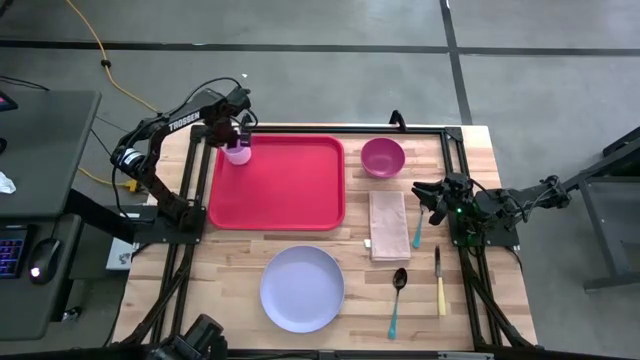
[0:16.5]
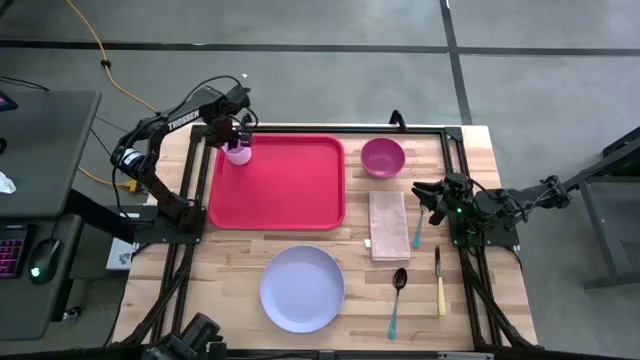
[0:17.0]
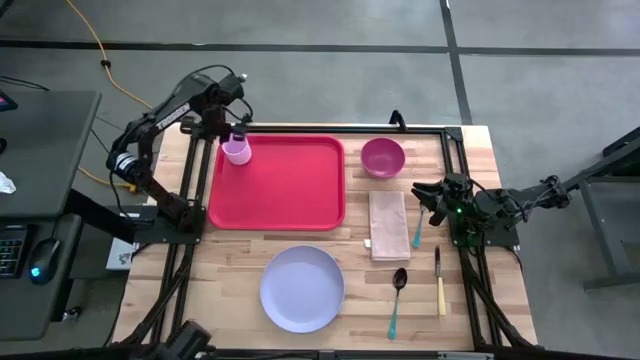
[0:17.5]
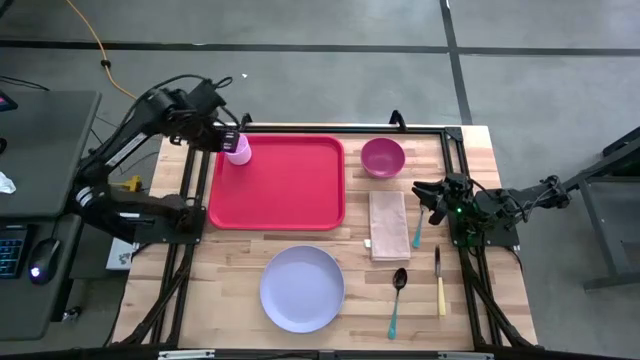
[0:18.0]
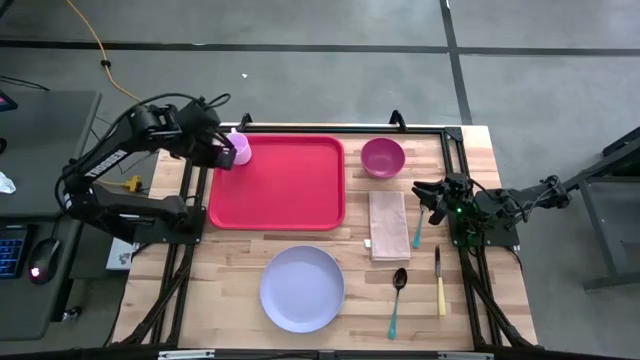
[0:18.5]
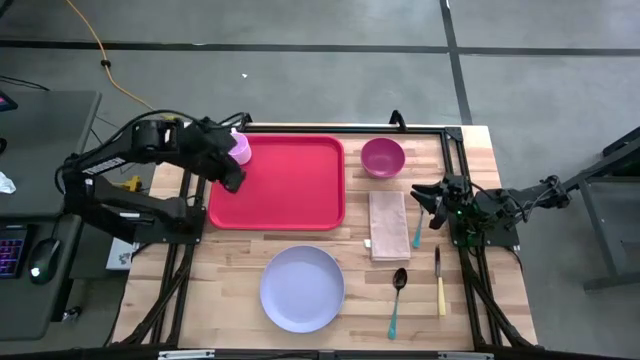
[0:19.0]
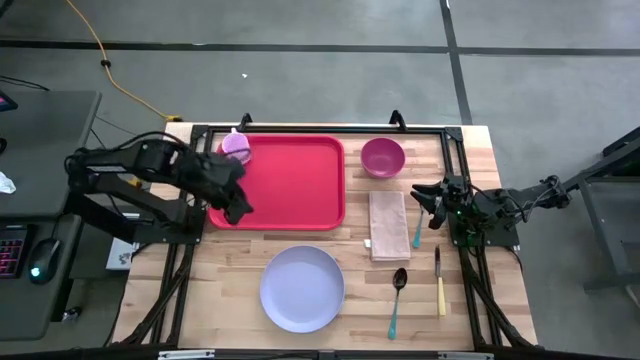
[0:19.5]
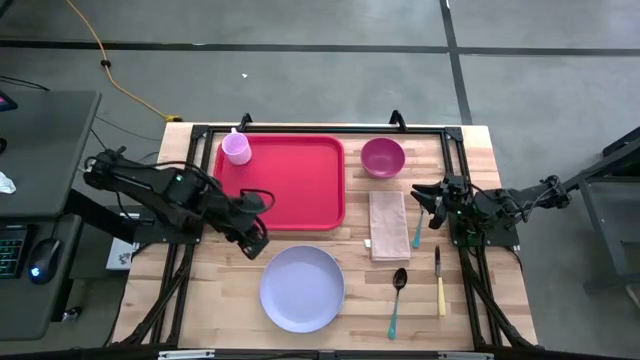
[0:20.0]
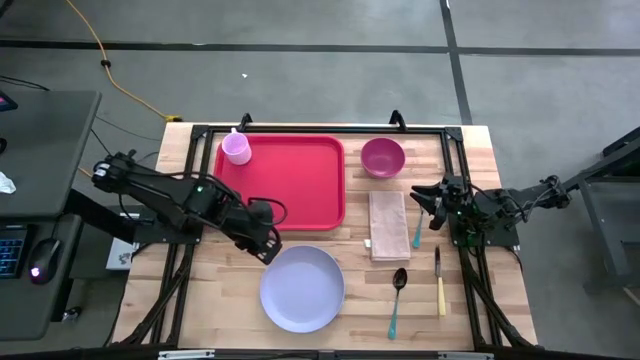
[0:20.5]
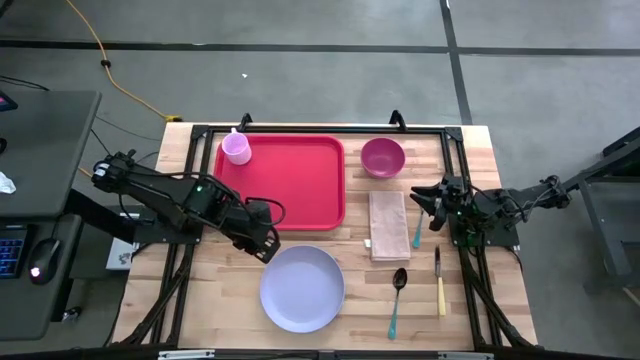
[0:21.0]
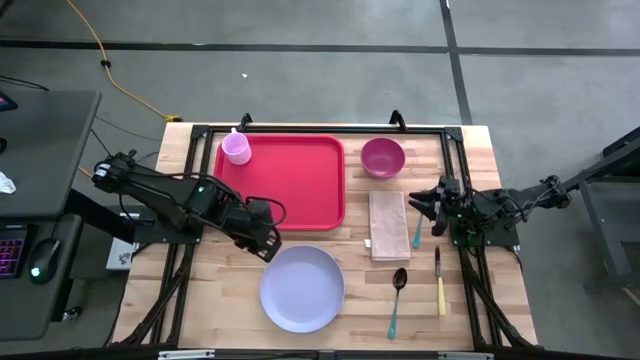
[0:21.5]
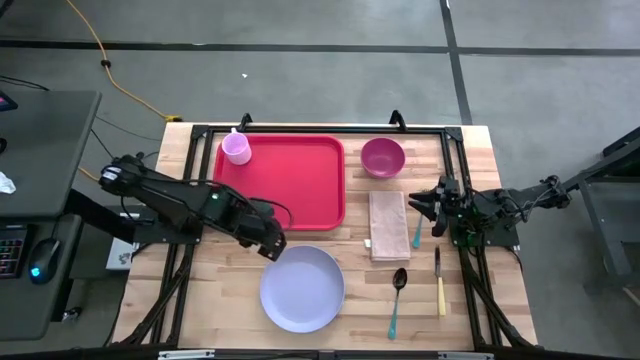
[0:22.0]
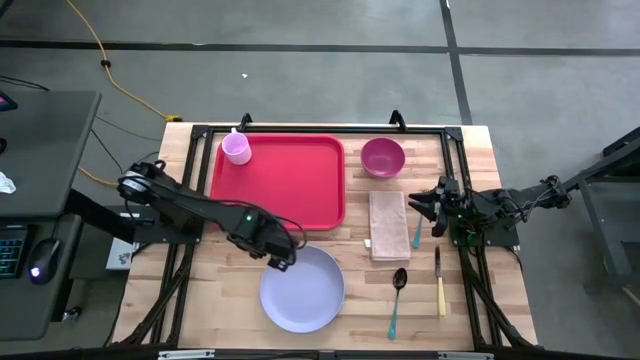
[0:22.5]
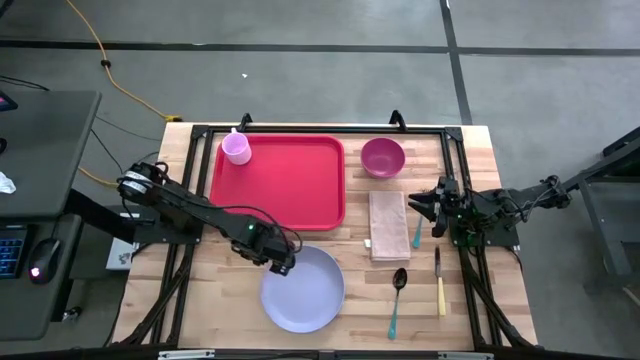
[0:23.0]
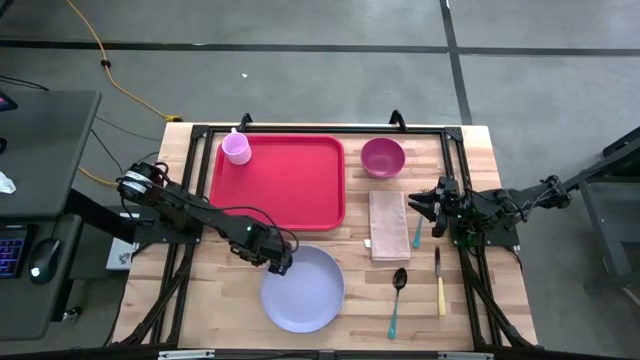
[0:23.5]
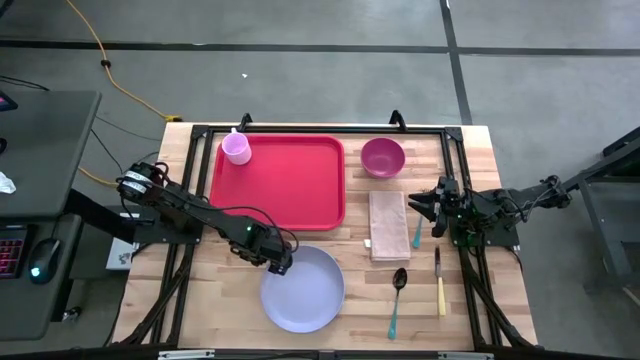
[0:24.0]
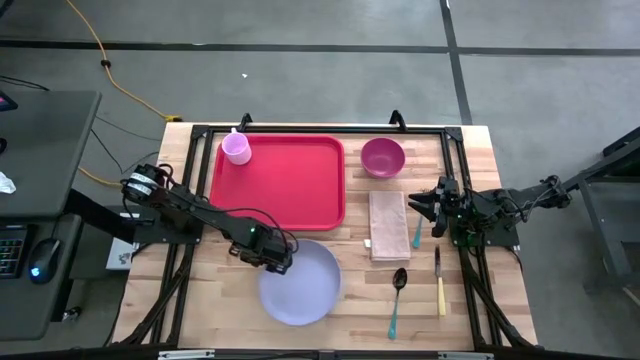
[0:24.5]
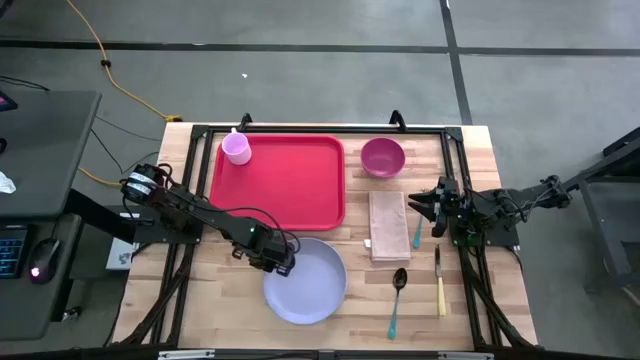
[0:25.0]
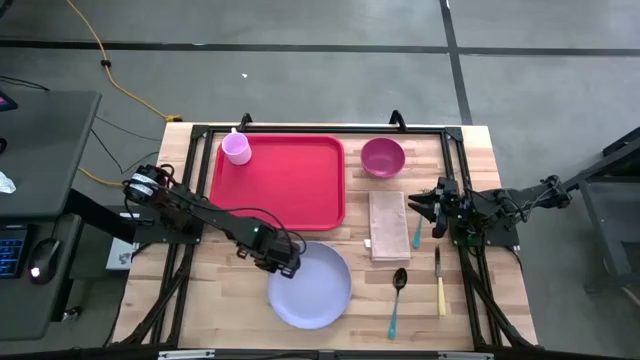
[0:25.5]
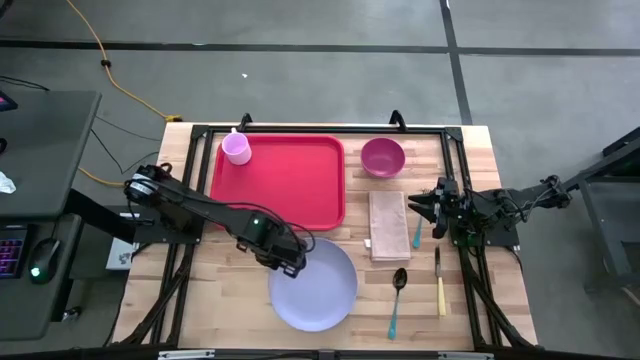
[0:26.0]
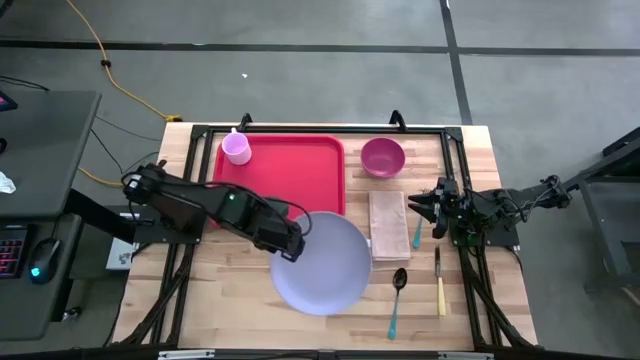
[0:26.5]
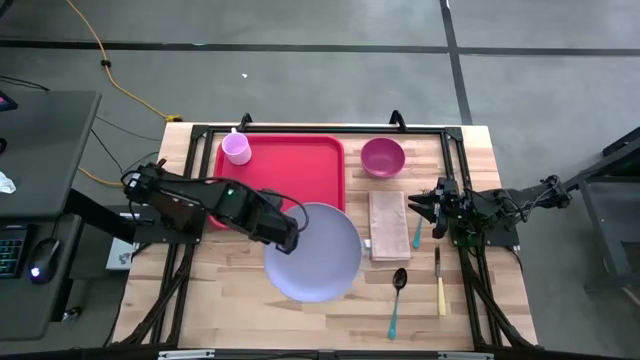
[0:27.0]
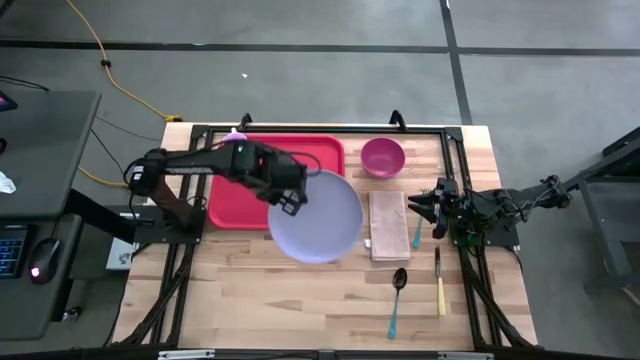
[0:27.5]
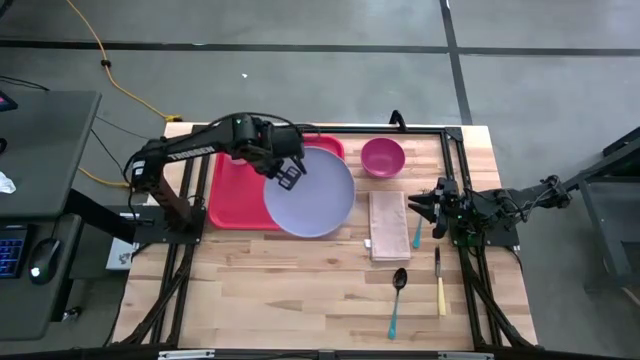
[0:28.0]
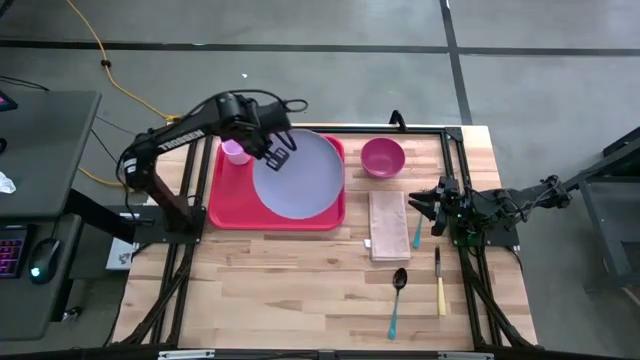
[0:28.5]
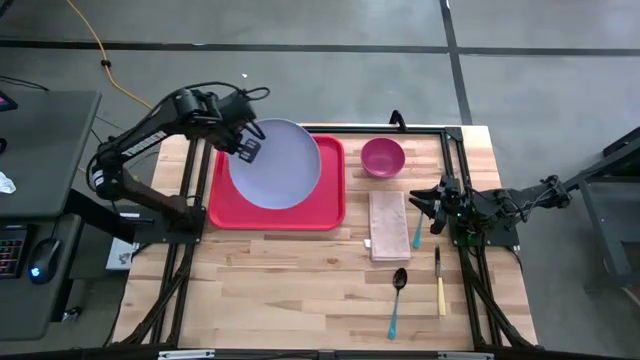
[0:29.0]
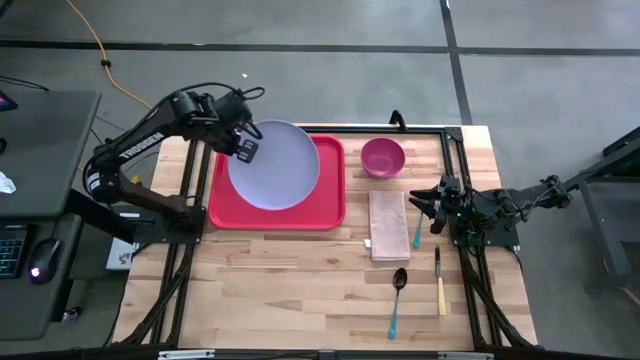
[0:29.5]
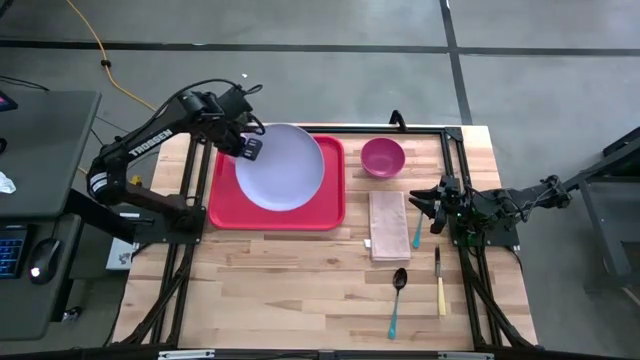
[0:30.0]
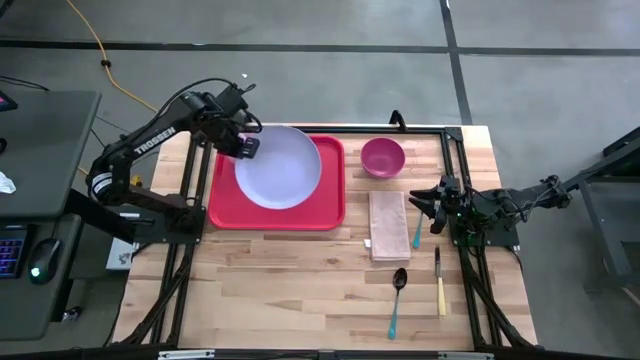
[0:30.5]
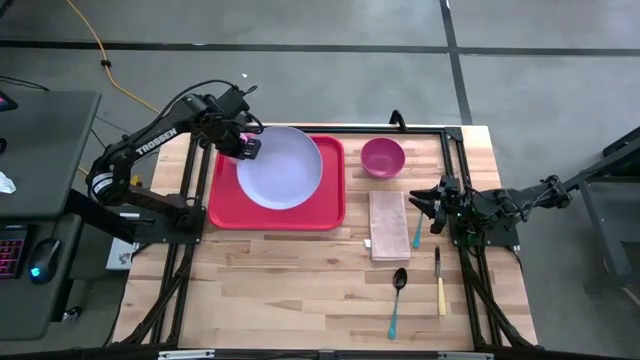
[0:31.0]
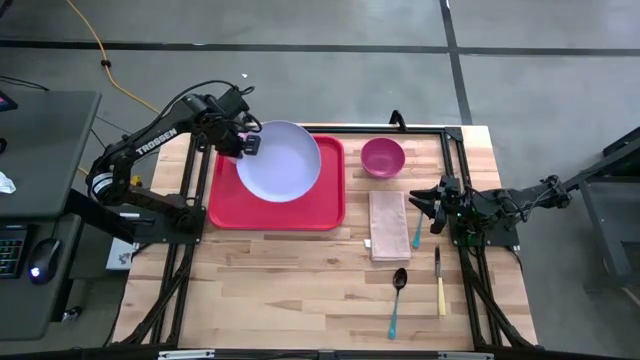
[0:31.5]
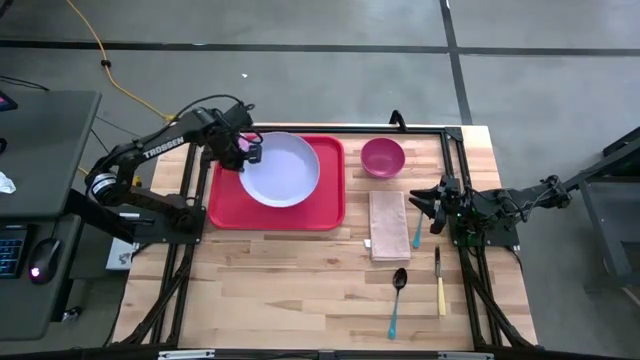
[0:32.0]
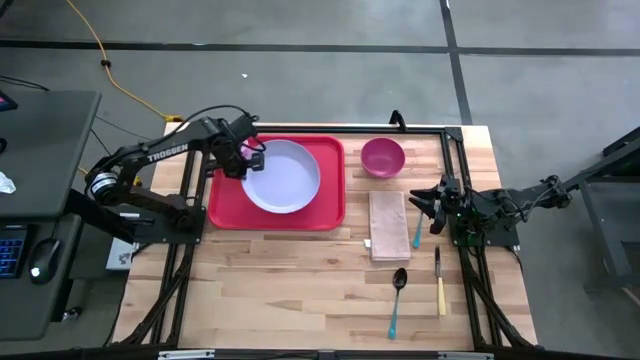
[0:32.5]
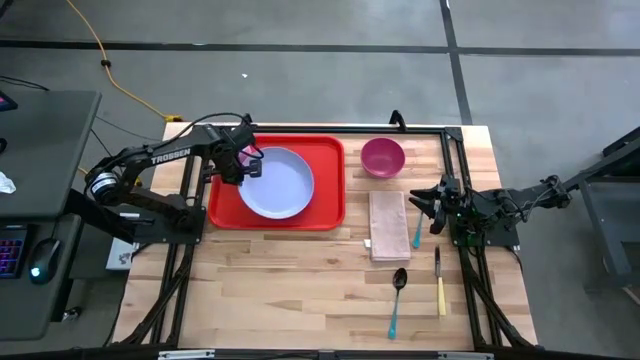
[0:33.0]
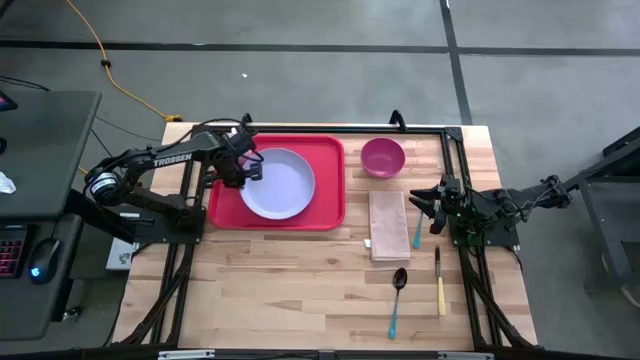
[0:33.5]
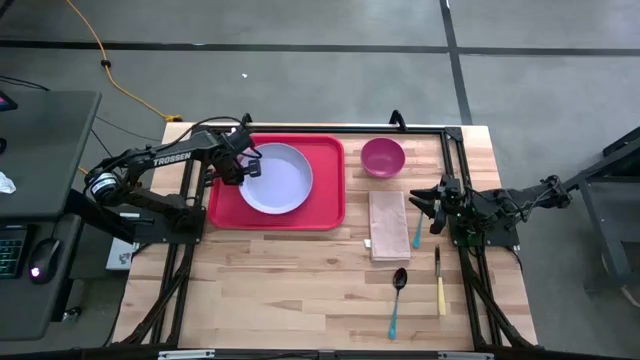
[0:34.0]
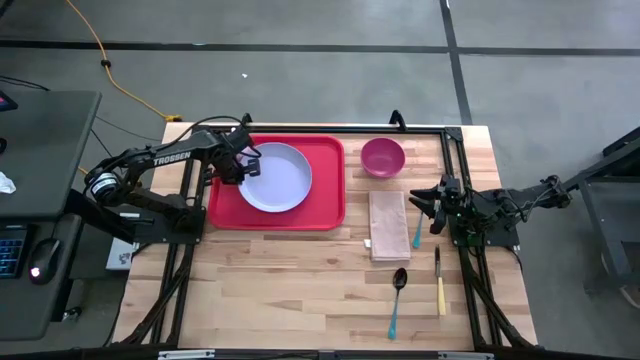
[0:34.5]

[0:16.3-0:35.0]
Task: Set up tray
Put the light purple plate on the orange tray

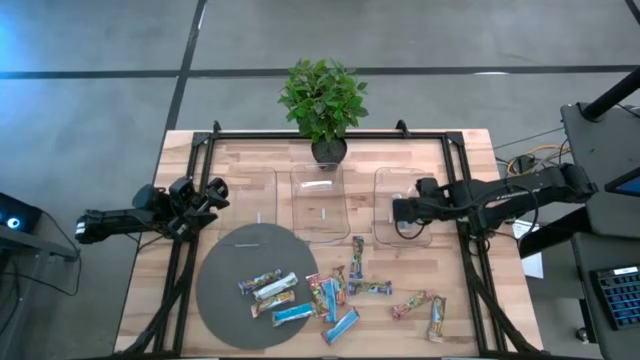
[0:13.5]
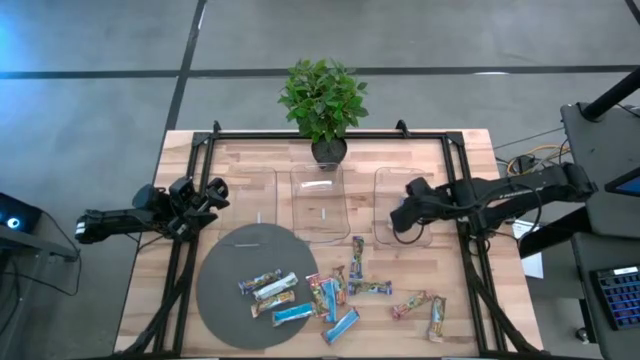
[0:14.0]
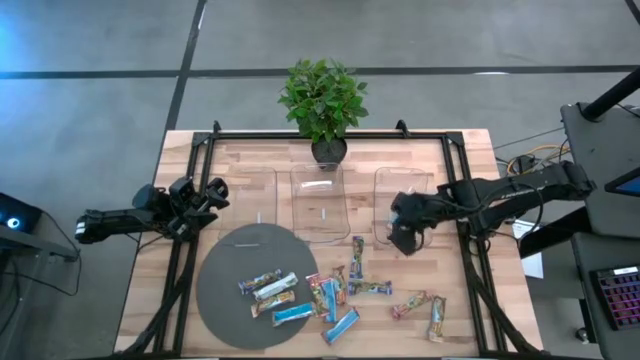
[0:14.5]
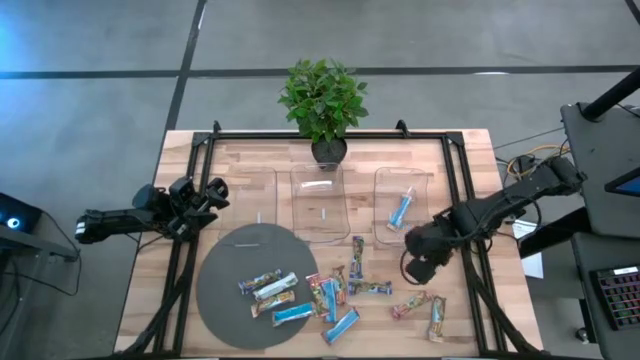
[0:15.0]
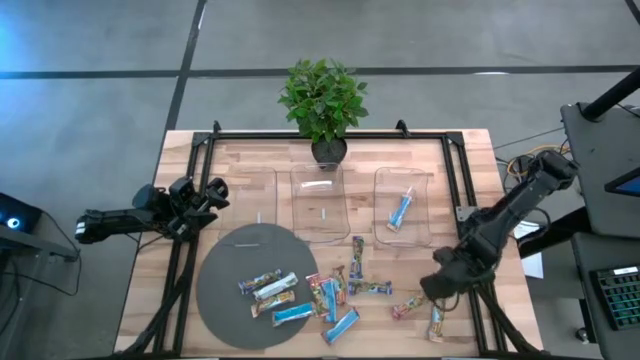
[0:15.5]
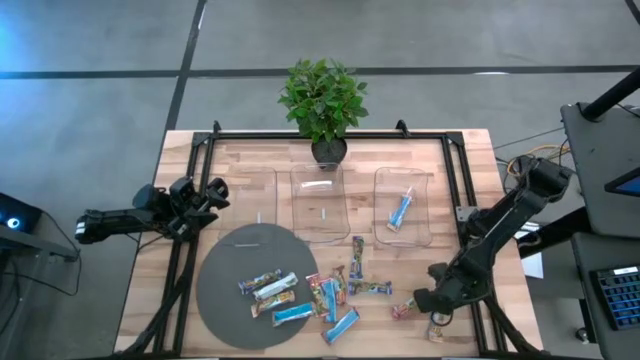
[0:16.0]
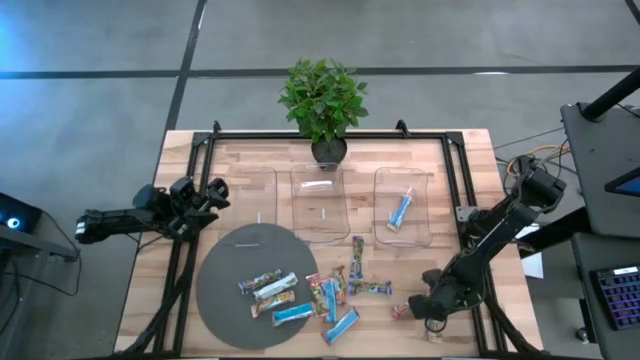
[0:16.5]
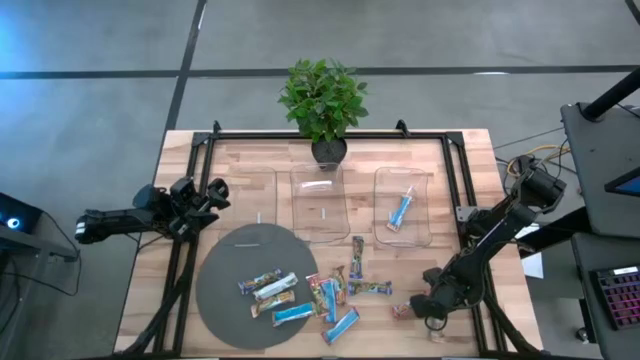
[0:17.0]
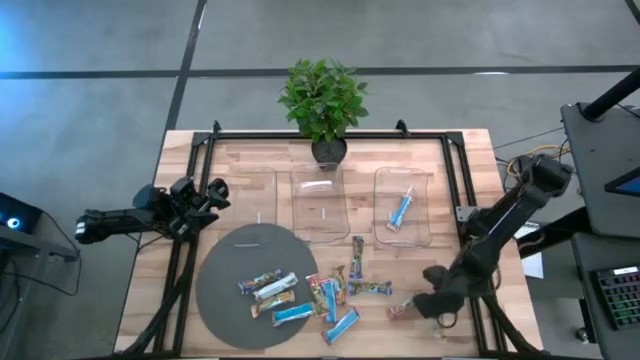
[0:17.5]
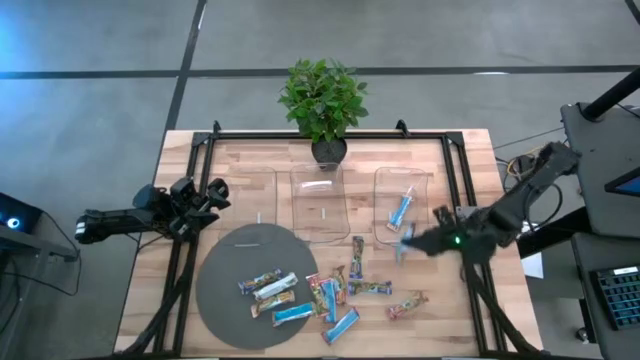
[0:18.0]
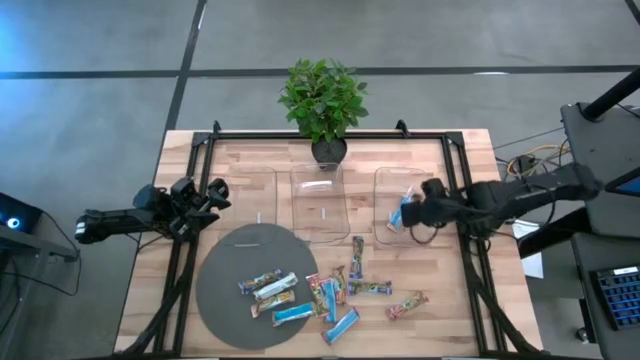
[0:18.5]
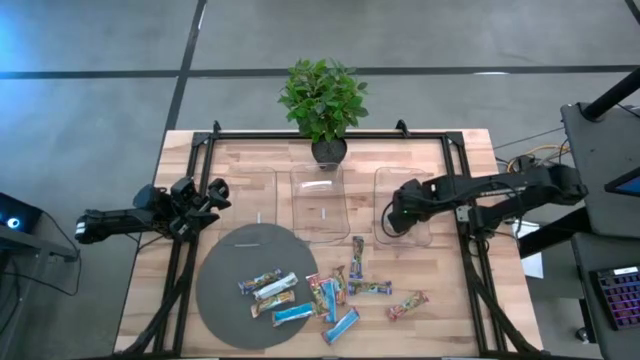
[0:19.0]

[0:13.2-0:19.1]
Task: Pick and place Granola Bars by type
Put the yellow granola bar into the right transparent bin
